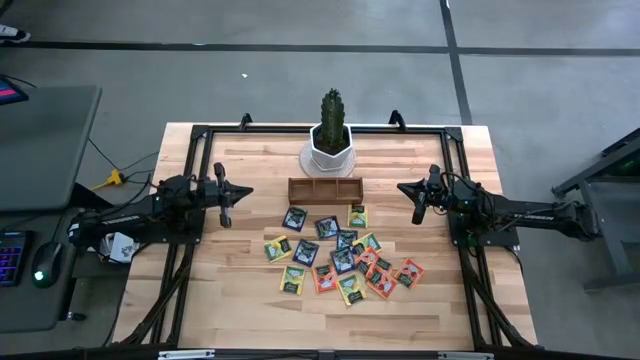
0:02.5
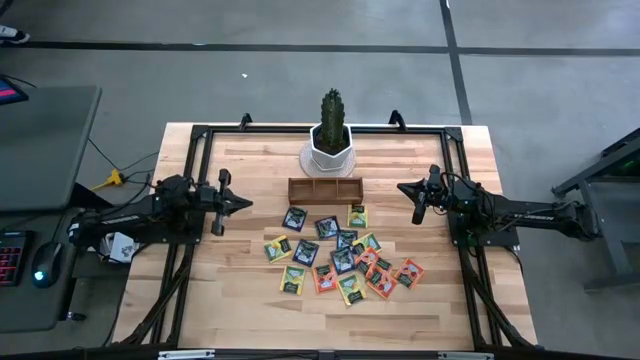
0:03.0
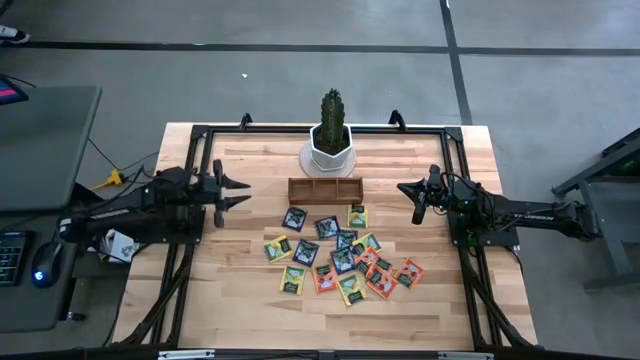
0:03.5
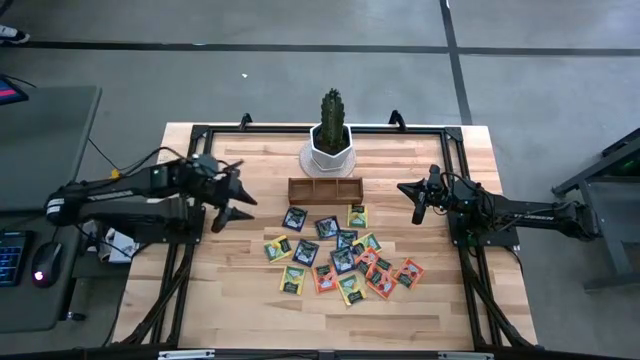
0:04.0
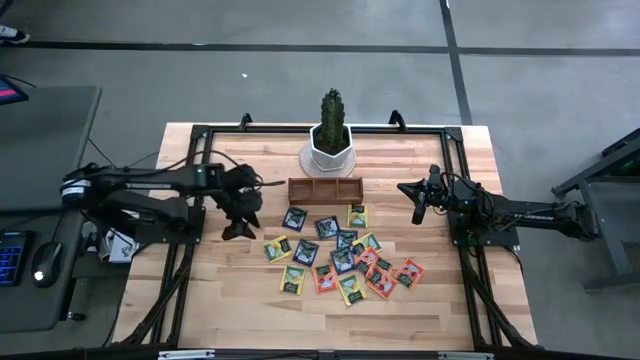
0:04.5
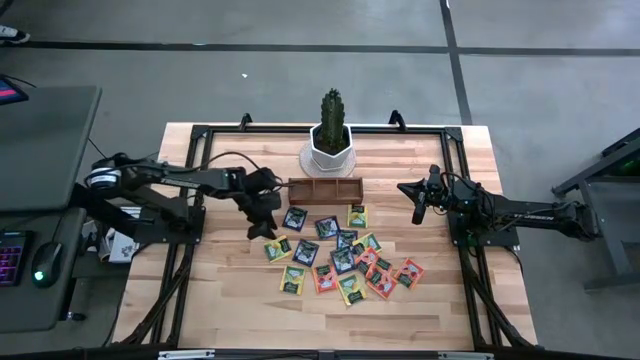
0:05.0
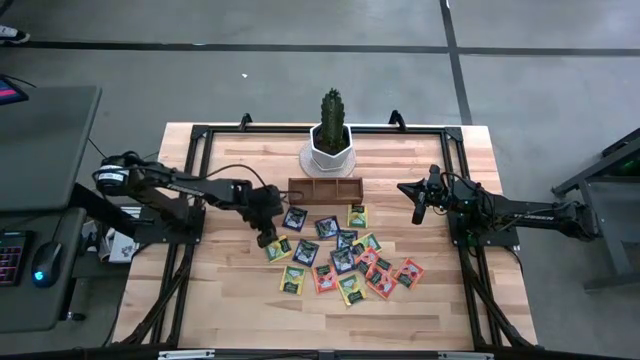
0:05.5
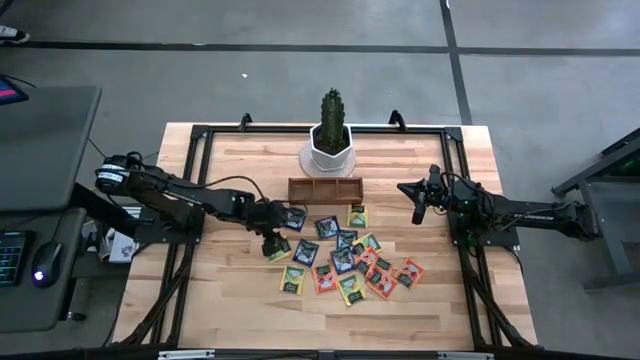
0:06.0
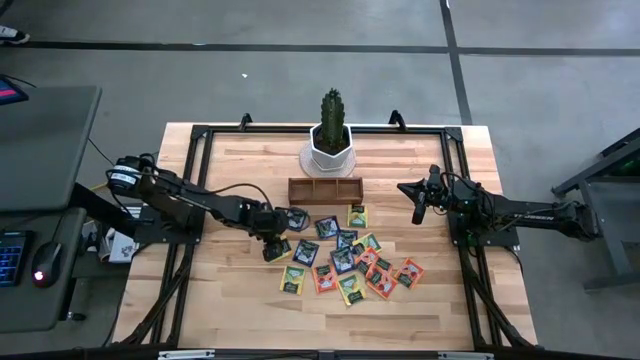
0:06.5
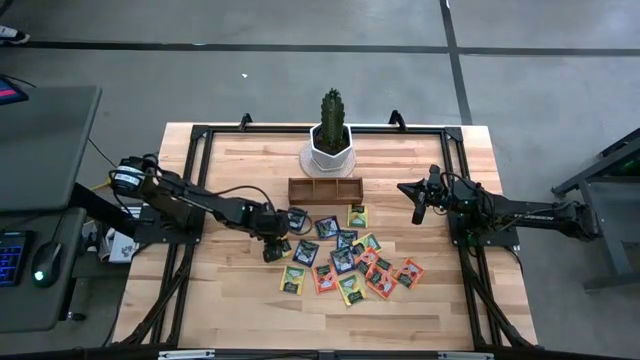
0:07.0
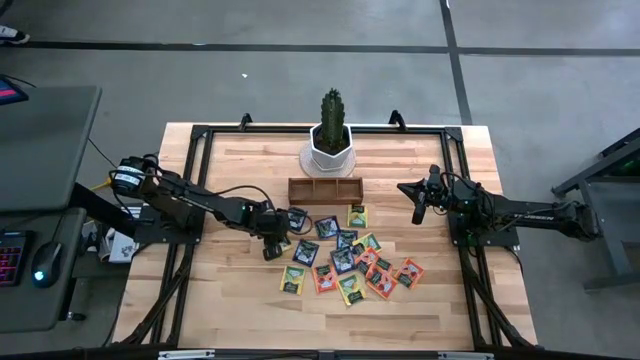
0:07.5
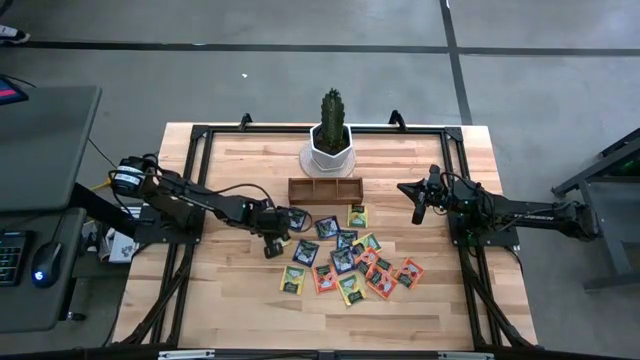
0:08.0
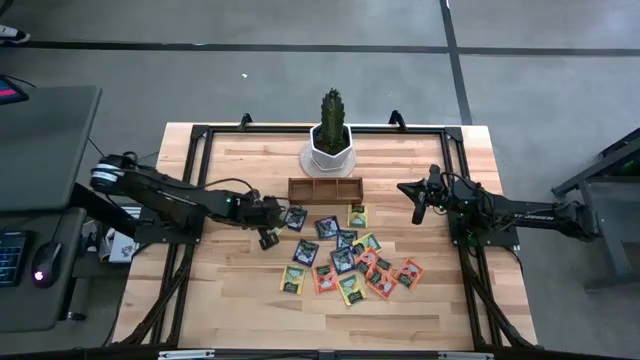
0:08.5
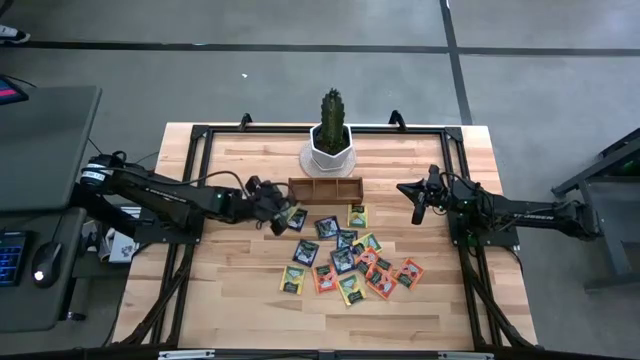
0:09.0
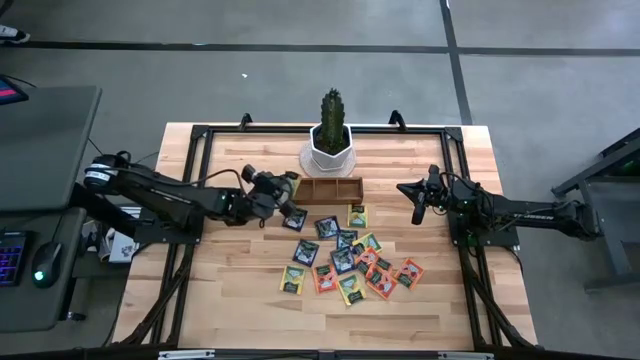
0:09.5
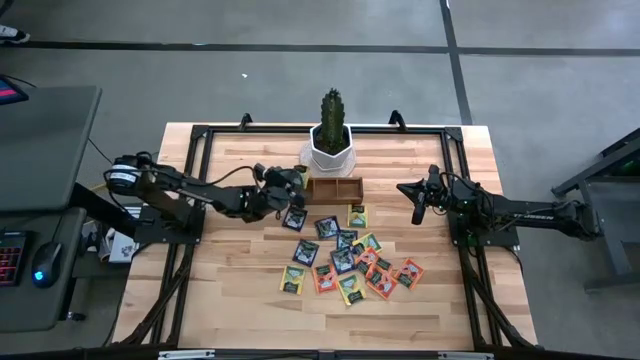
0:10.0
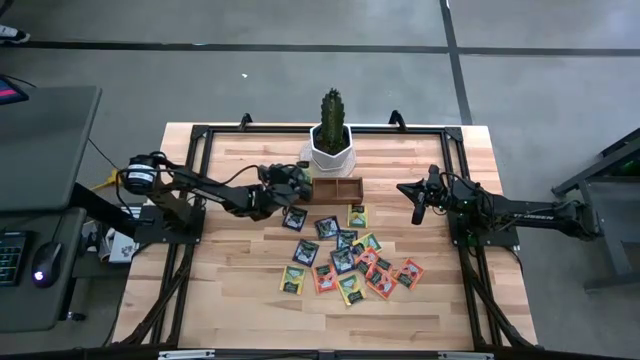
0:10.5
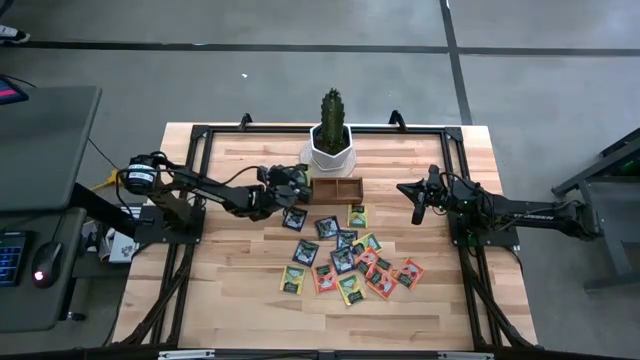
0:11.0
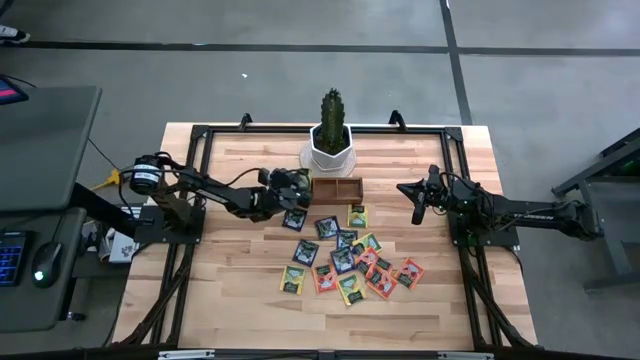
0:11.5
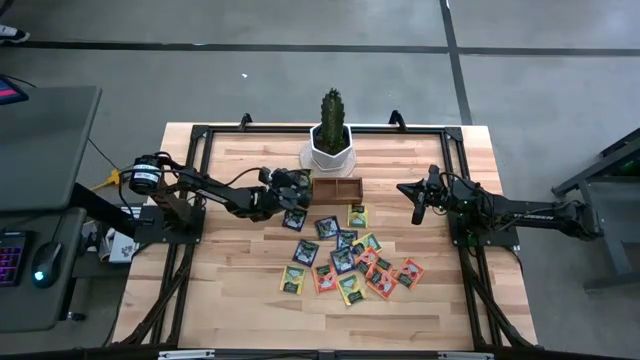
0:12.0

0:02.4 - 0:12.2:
Task: Pick & Place Tea
Put the yellow tea bag into the left section of the wooden organizer

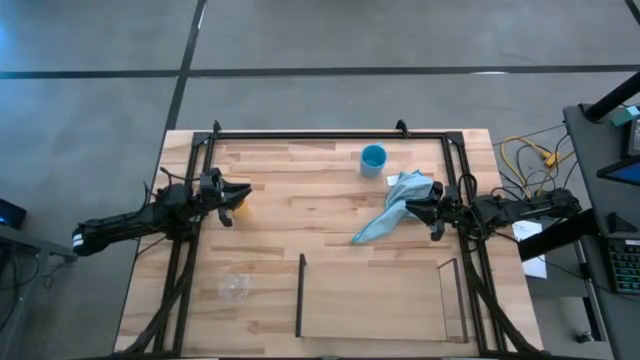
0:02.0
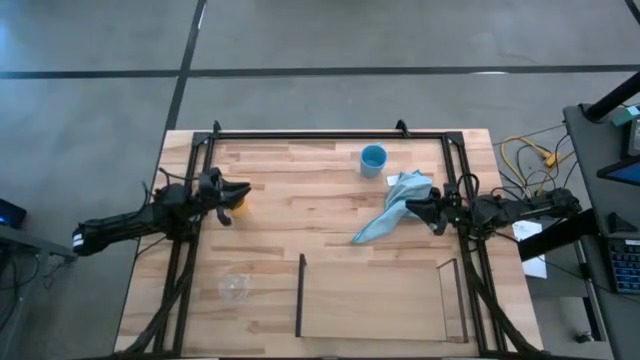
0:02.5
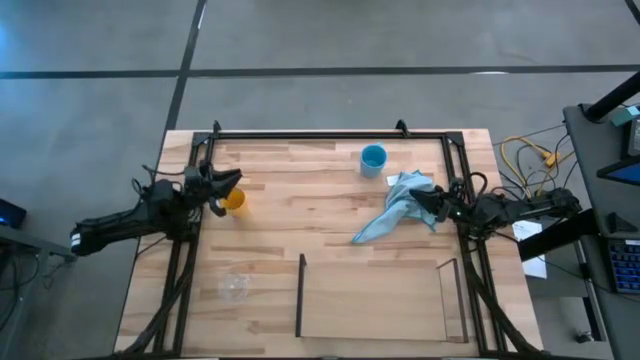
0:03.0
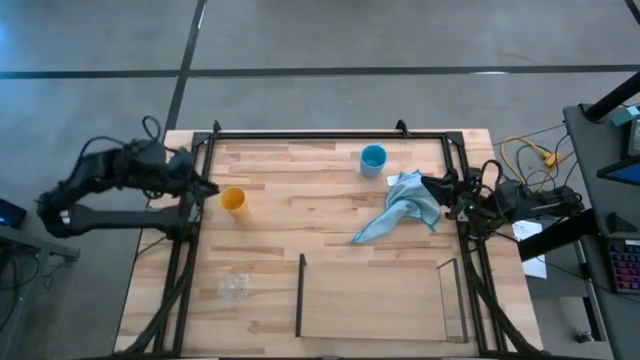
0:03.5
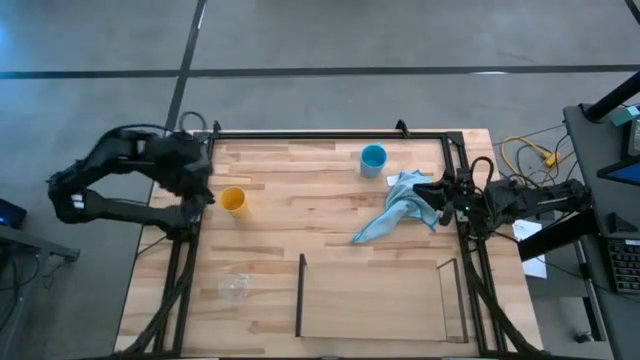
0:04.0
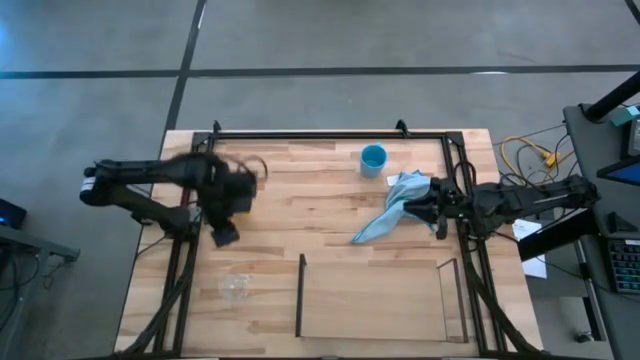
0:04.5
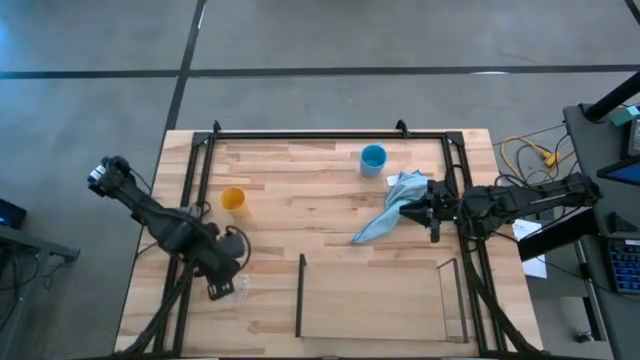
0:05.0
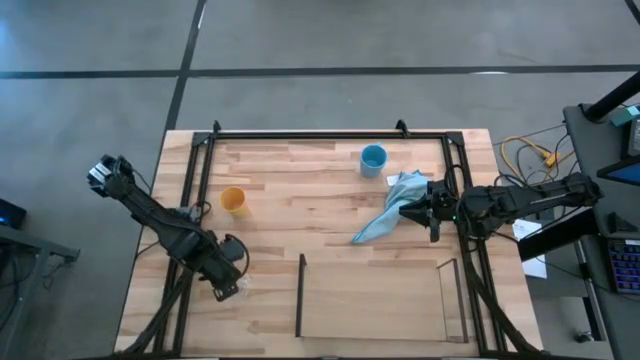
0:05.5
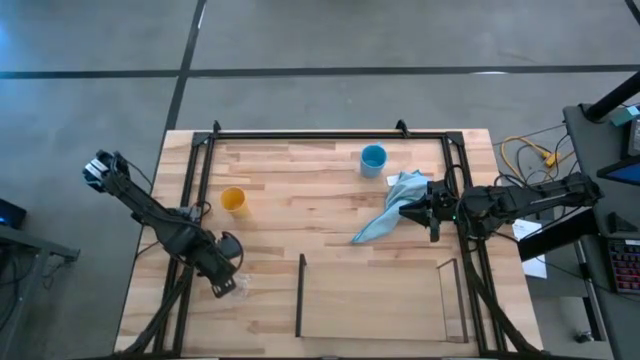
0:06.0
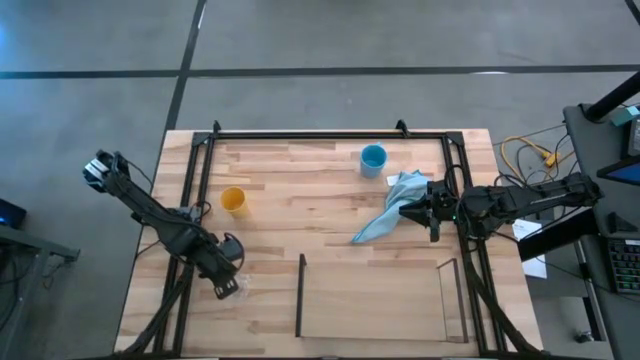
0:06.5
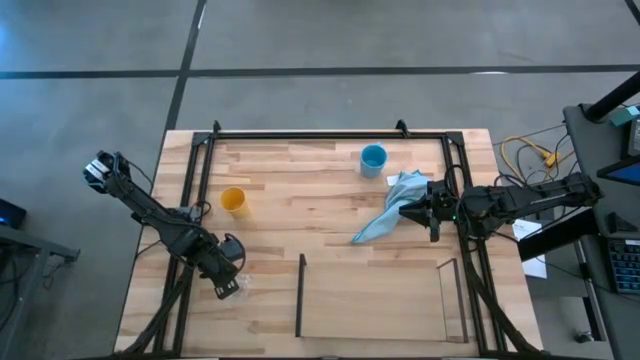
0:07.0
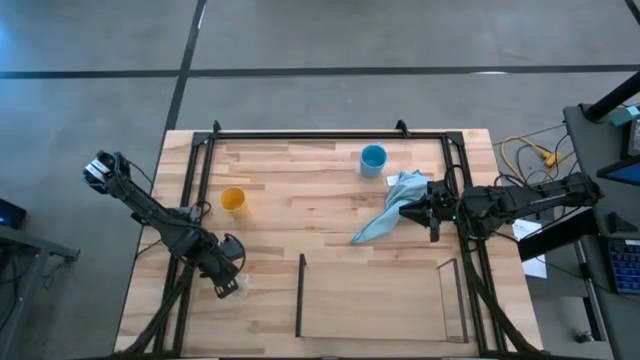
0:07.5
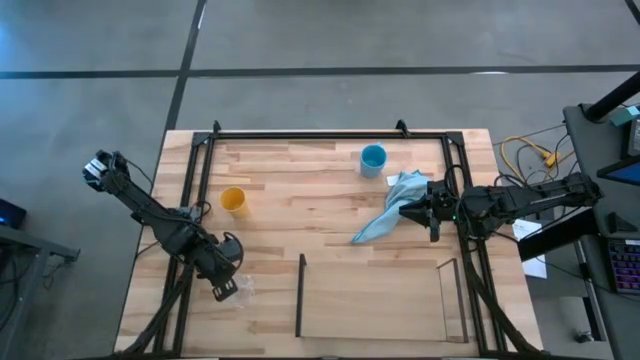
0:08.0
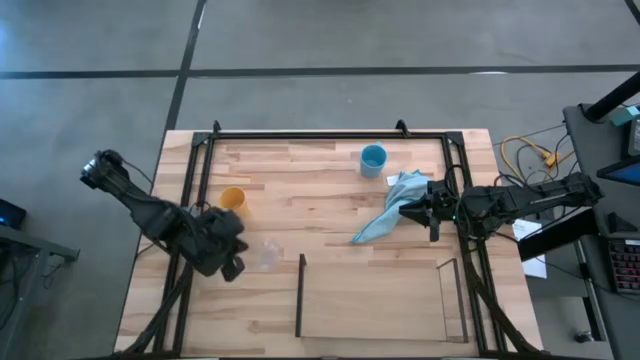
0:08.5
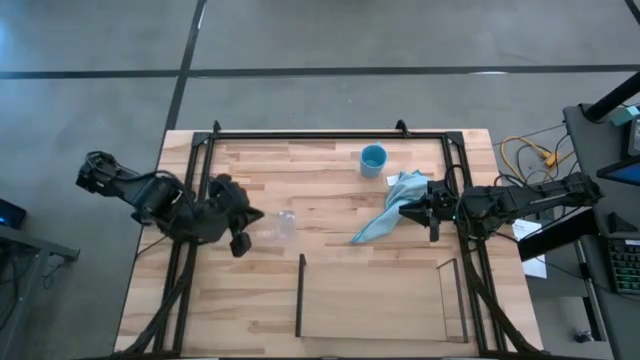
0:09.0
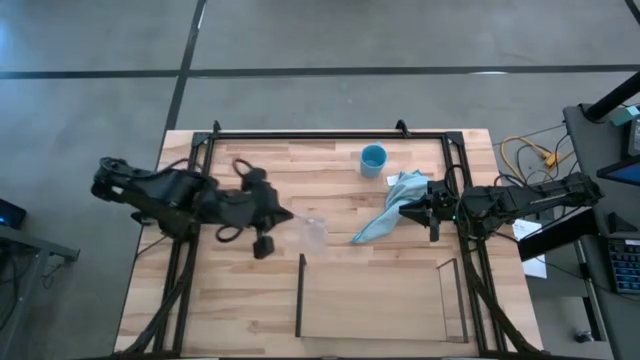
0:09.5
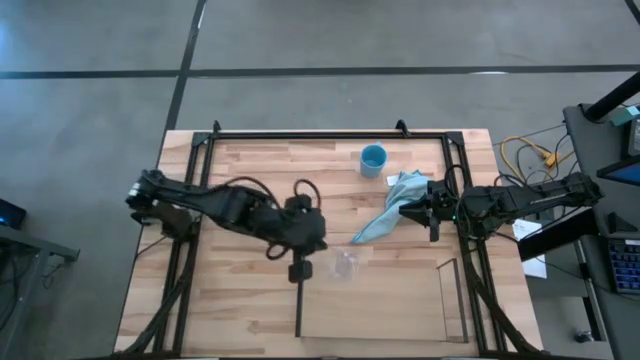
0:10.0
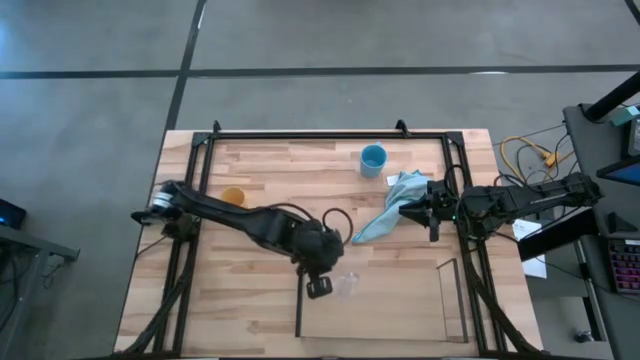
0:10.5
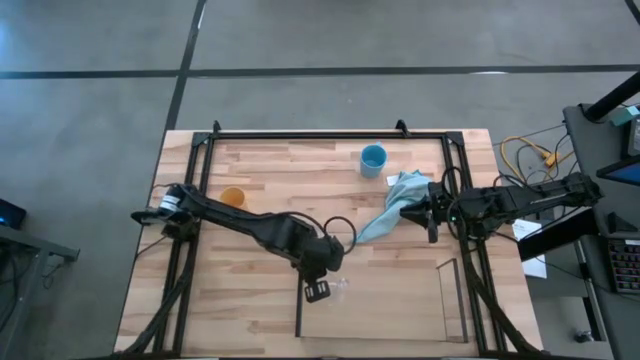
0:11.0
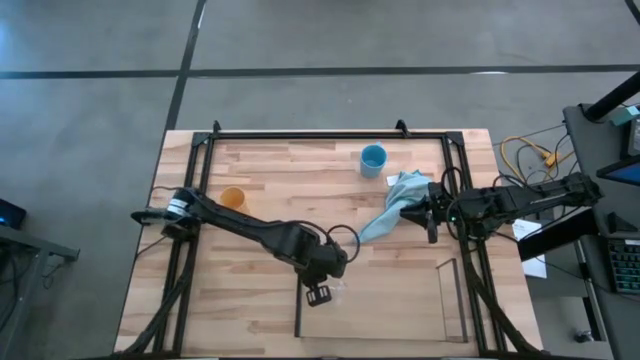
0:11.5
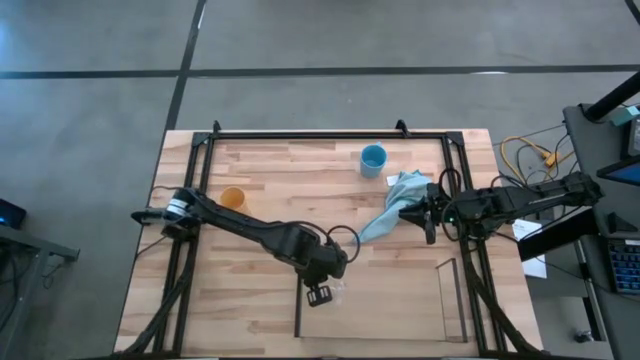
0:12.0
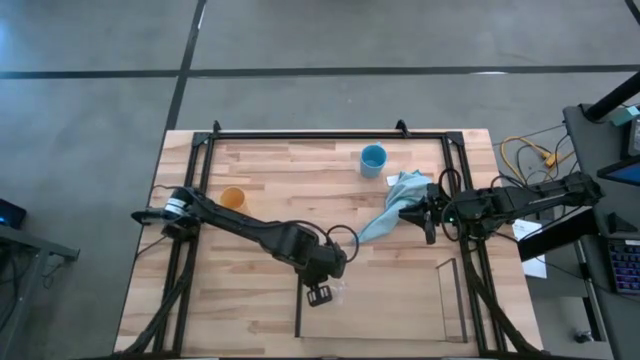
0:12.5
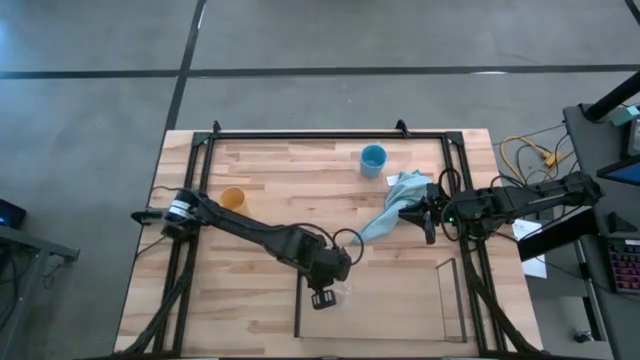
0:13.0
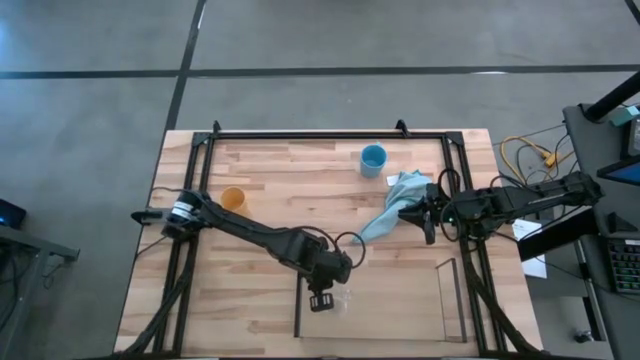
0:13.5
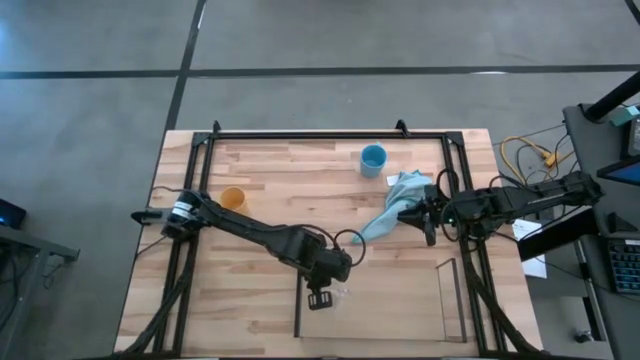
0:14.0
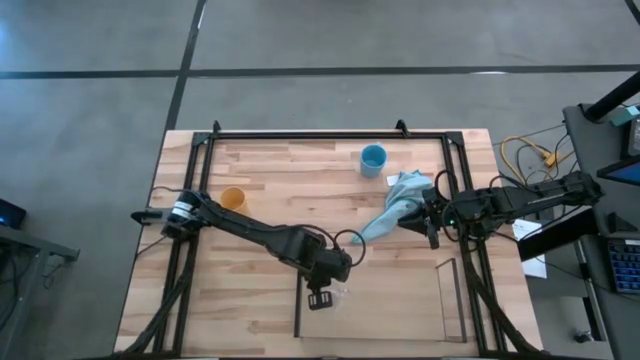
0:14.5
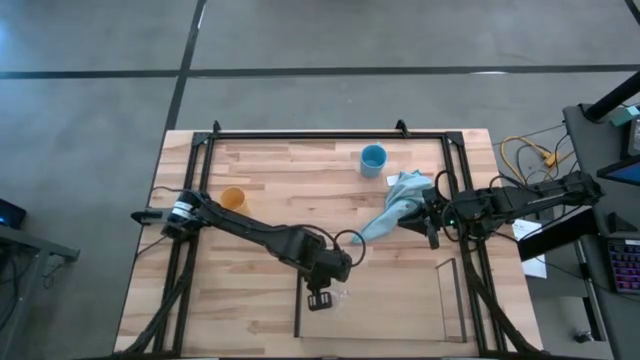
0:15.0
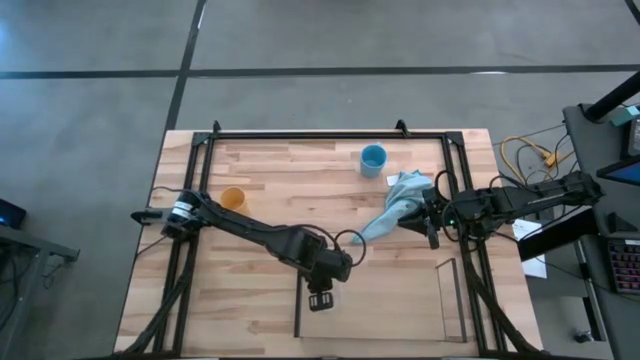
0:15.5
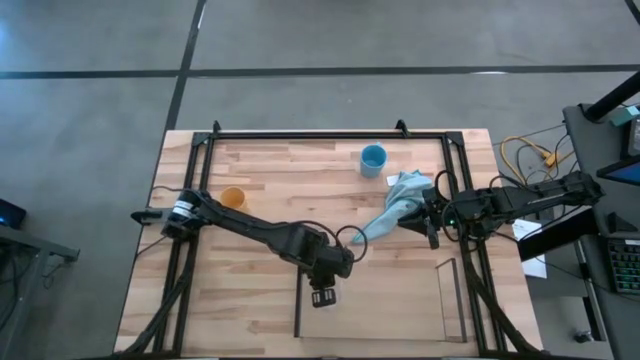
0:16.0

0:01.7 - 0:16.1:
Task: Stack small to large cups/mugs on shelf
Put the transparent cup on the shelf
